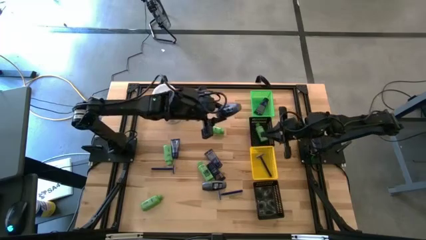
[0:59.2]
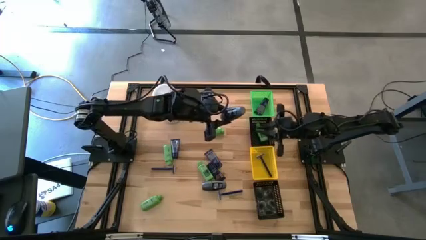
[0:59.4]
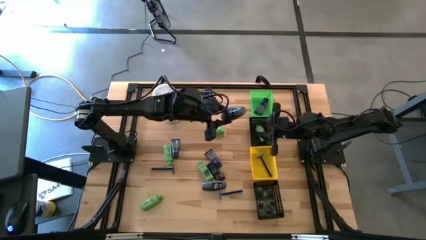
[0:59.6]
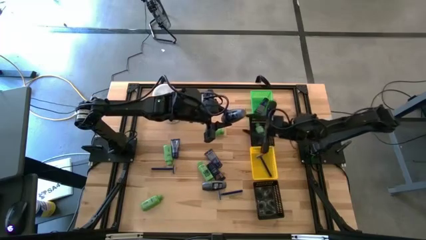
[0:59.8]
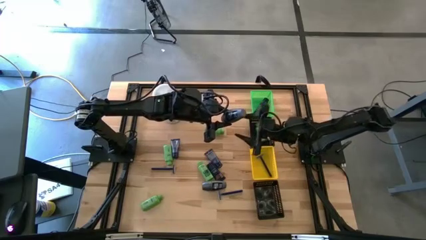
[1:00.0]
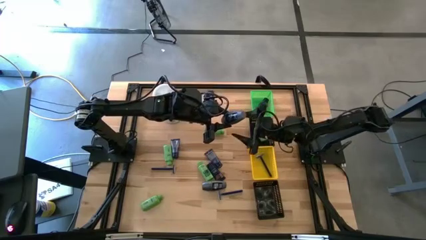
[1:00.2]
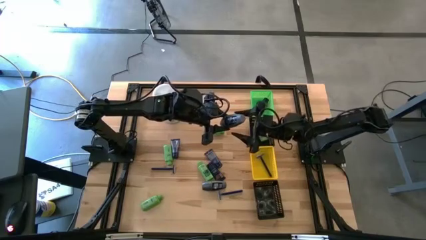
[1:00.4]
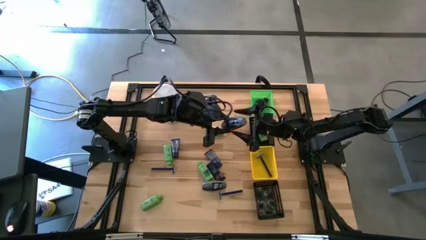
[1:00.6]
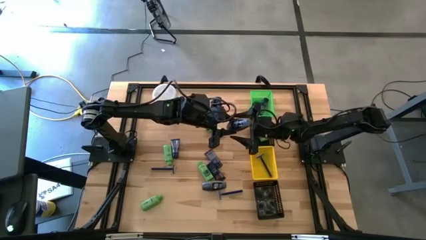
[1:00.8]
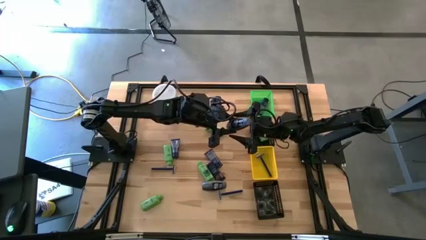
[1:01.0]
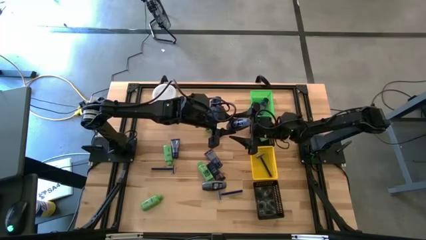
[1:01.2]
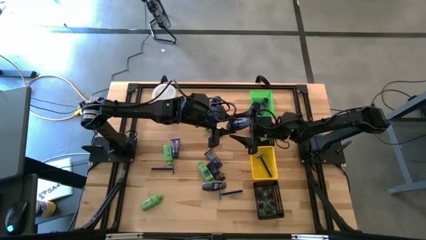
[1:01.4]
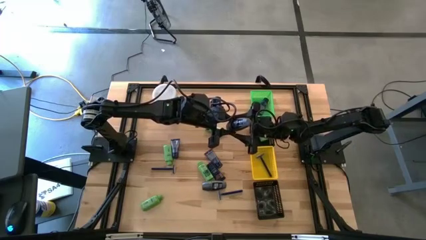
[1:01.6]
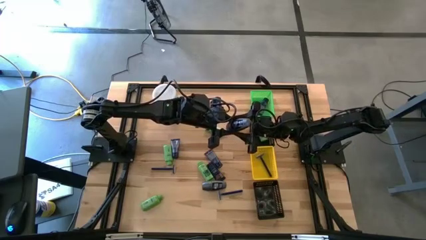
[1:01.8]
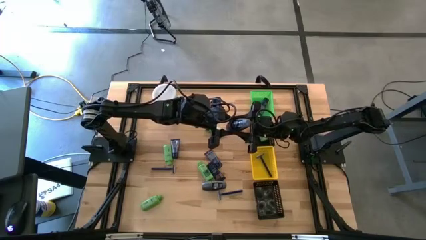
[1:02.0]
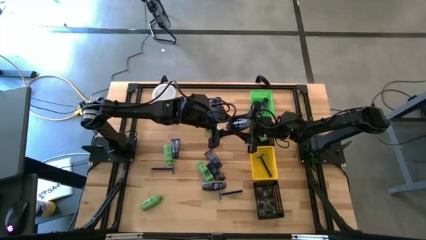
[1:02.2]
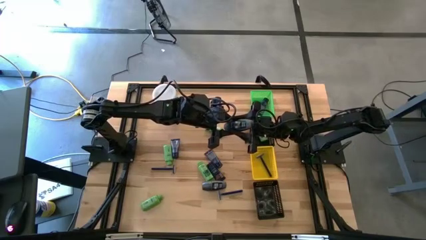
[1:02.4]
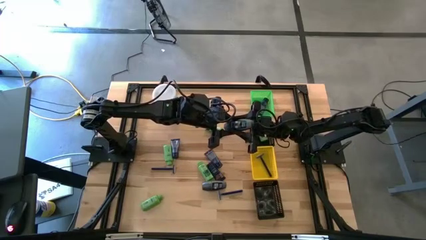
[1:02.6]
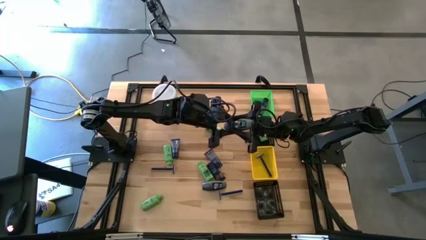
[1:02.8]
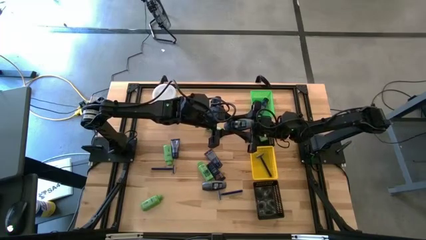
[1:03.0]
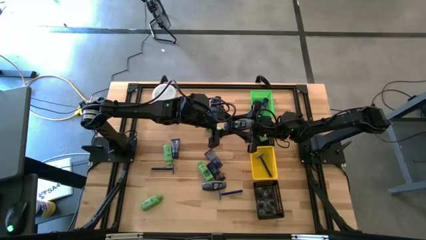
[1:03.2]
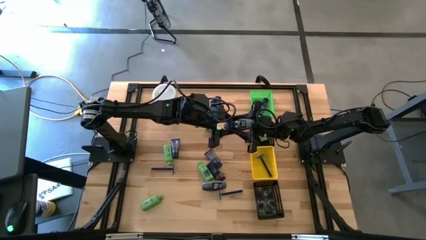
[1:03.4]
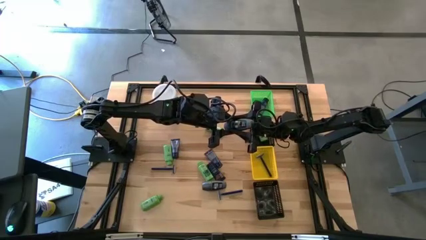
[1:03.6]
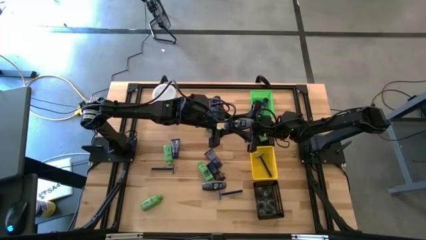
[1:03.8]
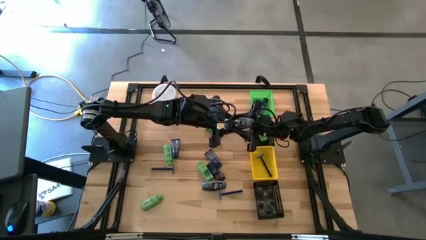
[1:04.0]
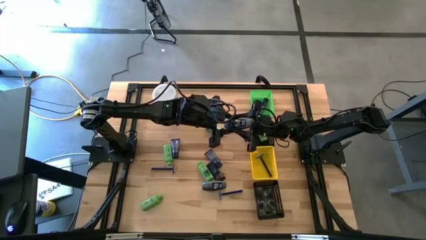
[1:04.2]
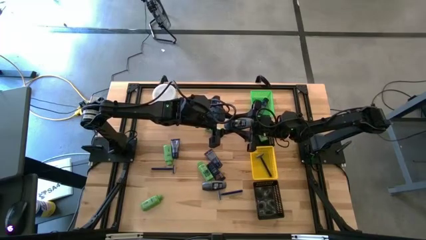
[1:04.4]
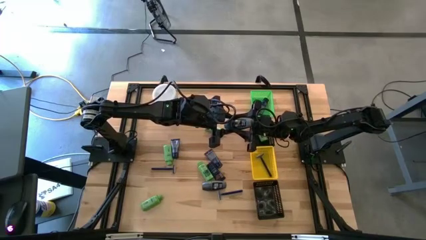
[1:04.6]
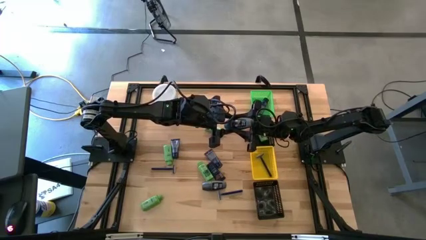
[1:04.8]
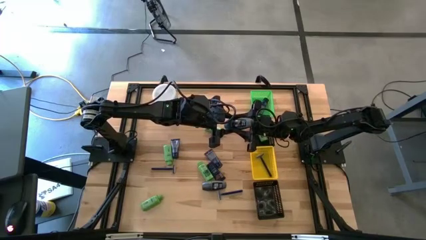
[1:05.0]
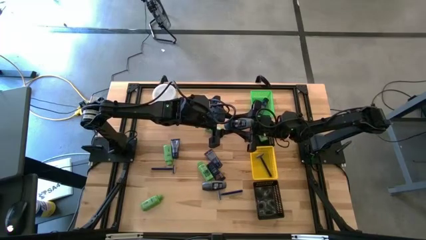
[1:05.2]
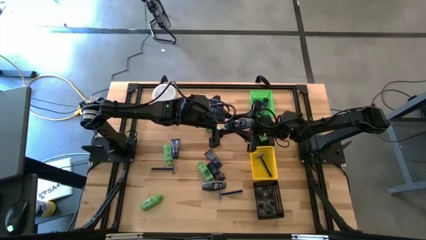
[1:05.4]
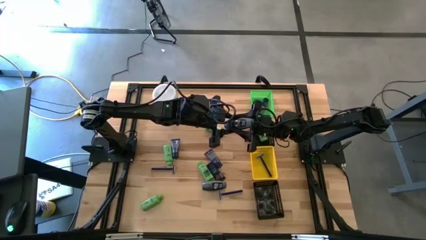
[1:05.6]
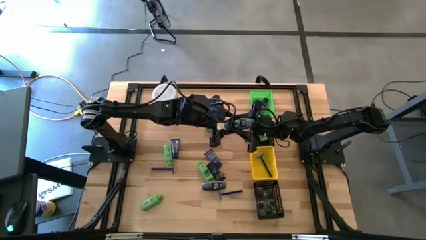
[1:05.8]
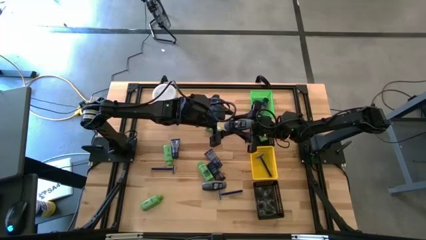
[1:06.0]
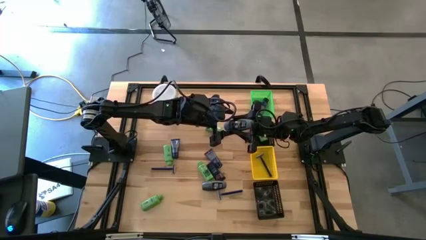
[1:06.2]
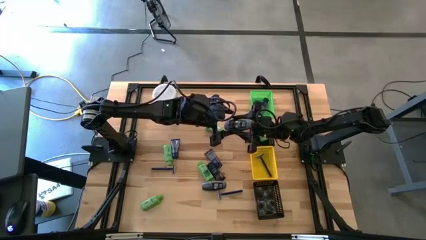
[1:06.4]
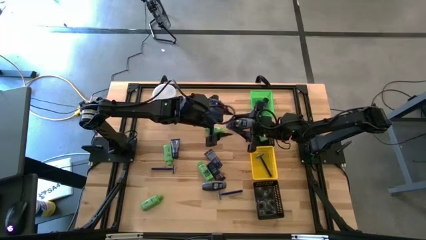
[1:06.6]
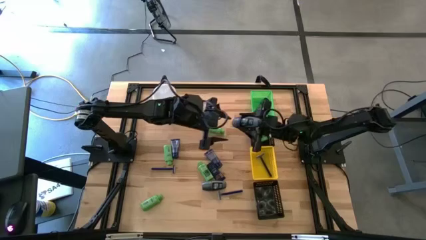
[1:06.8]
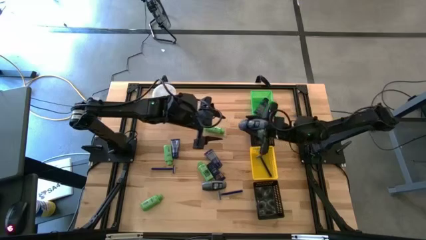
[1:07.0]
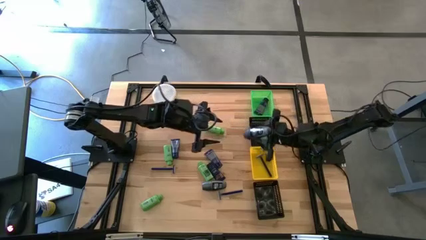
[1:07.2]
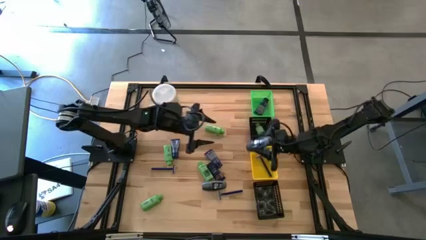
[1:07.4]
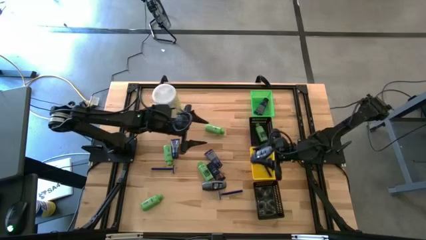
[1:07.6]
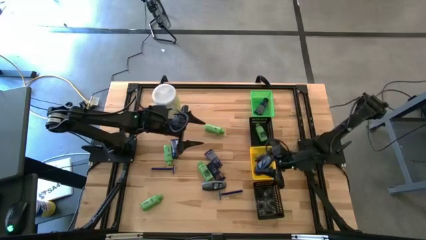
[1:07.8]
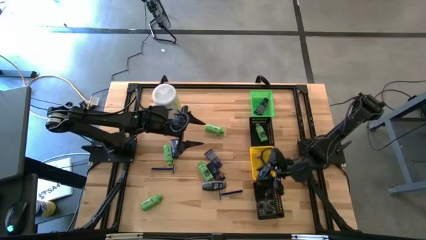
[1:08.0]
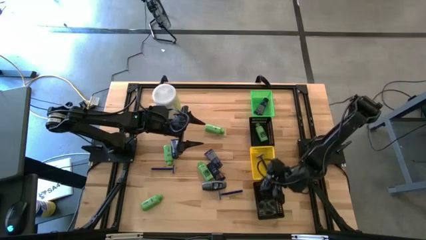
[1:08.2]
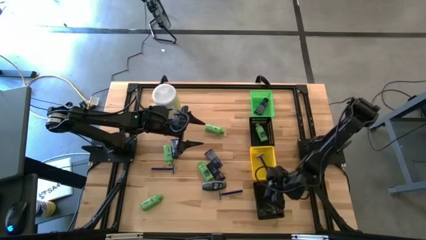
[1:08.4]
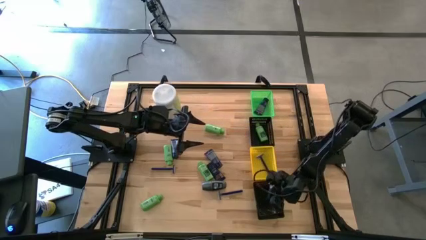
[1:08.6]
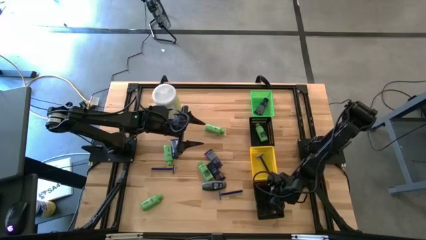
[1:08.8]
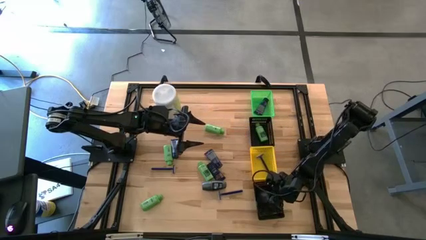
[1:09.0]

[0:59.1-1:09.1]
Task: Pick & Place Travel size toiletries
Put the gray deodorant into the bottom black basket

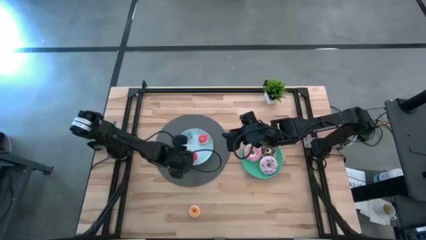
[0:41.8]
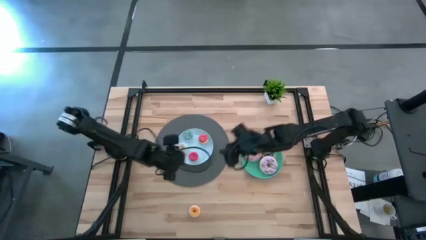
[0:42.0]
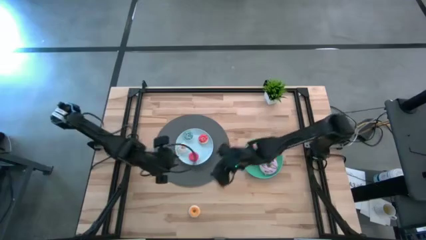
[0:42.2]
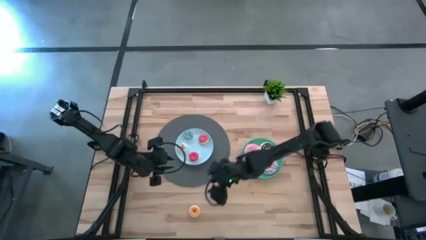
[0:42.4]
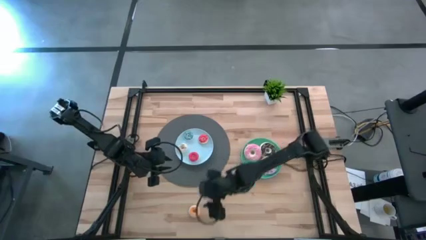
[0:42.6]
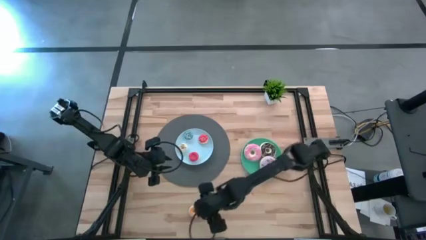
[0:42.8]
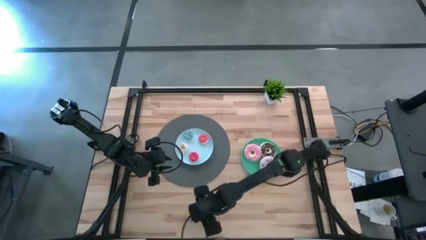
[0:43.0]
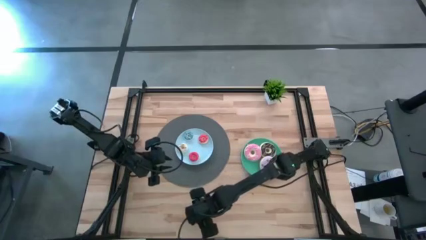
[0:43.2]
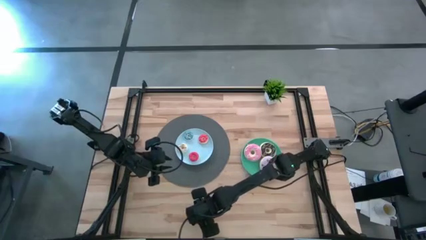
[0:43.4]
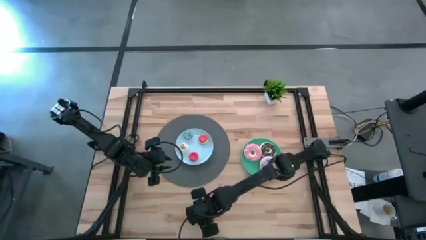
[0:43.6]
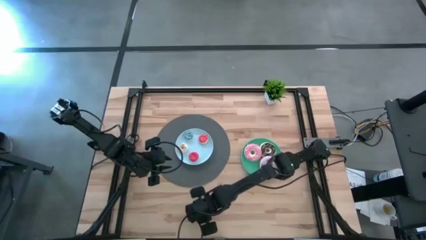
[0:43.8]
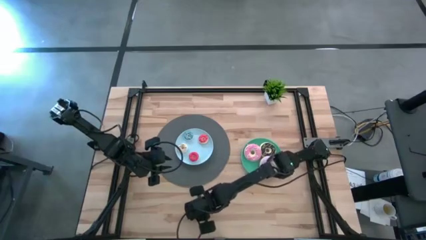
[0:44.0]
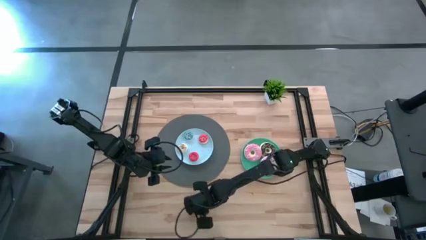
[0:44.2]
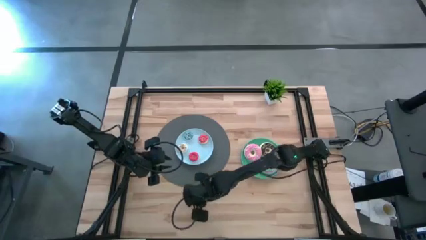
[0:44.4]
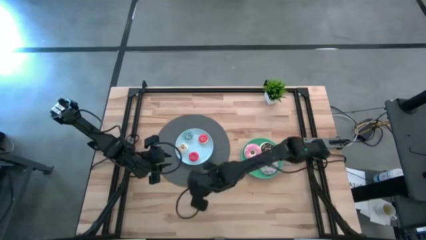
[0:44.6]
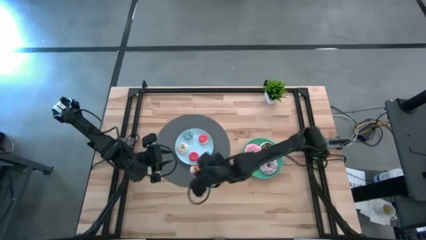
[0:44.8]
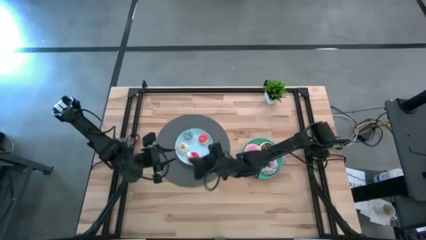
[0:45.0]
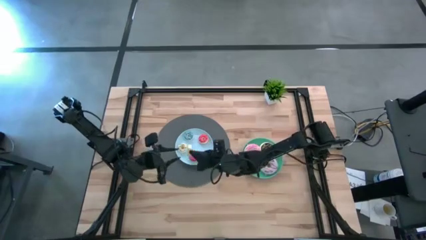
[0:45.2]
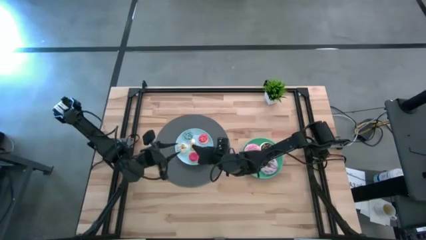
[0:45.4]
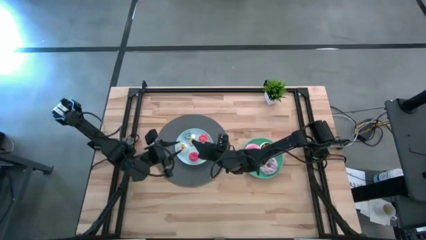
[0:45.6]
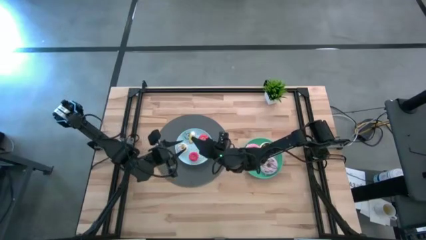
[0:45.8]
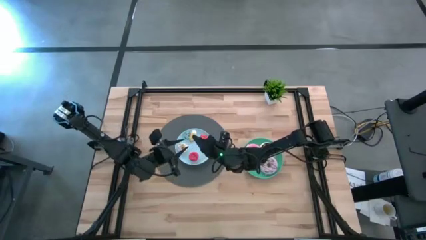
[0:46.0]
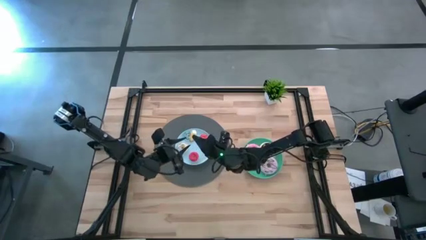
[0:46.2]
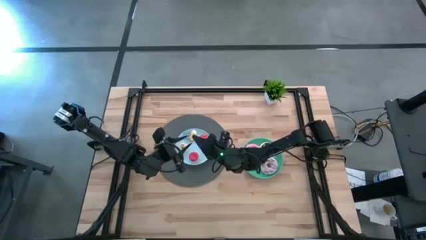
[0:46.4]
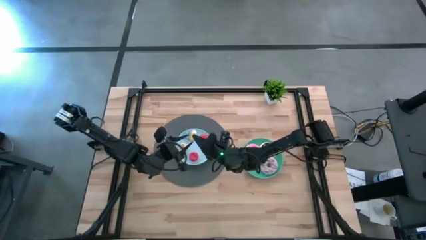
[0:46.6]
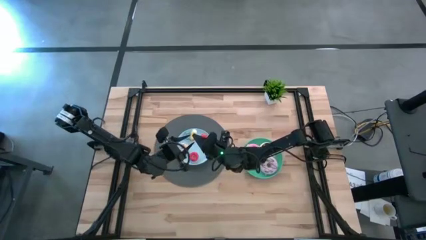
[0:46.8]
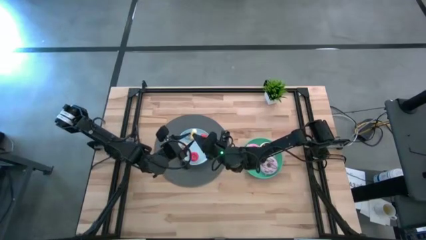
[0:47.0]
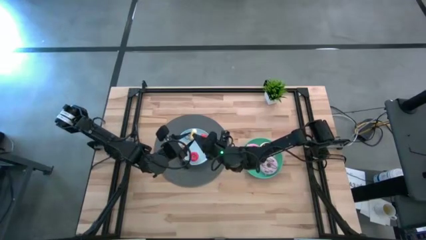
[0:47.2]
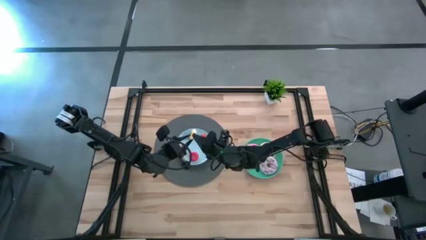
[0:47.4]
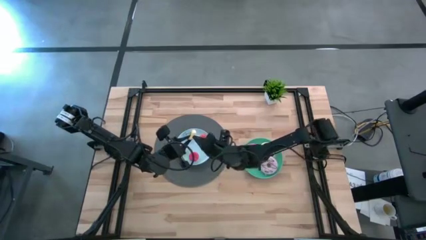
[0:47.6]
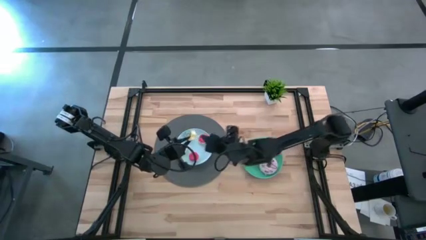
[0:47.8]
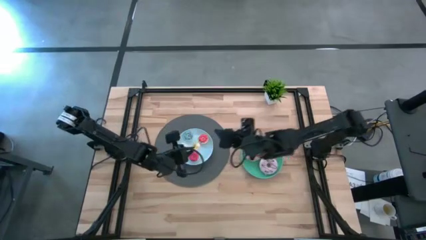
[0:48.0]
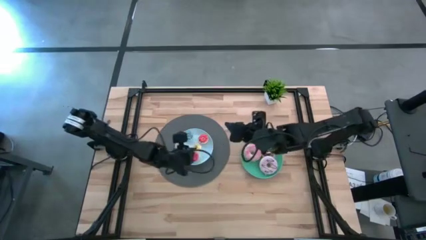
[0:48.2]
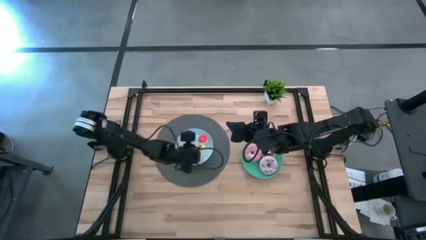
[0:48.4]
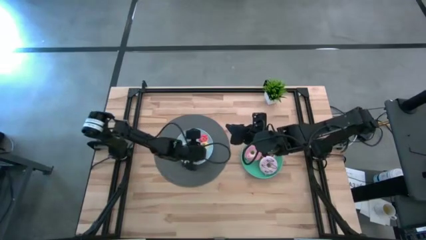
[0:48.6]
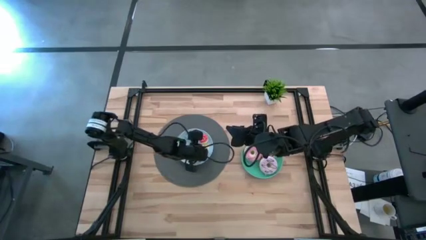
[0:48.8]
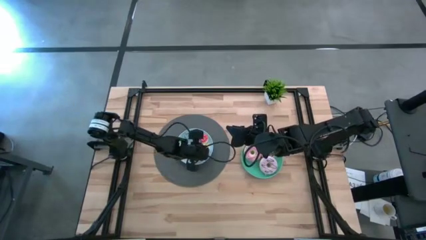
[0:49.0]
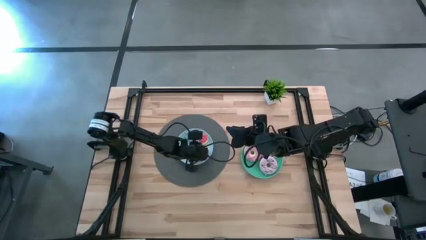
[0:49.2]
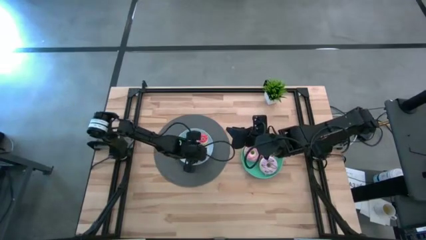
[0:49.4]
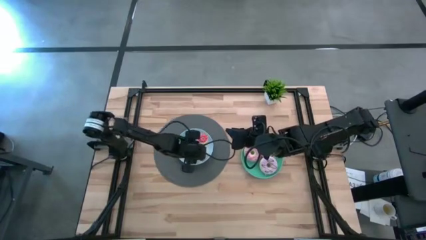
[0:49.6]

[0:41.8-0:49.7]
Task: Pick & Place donuts
Put the small yellow donut on the blue plate
